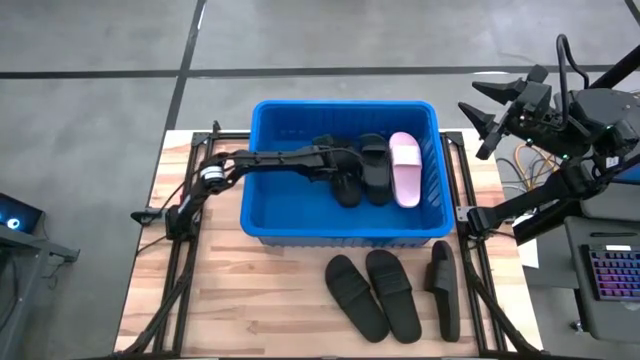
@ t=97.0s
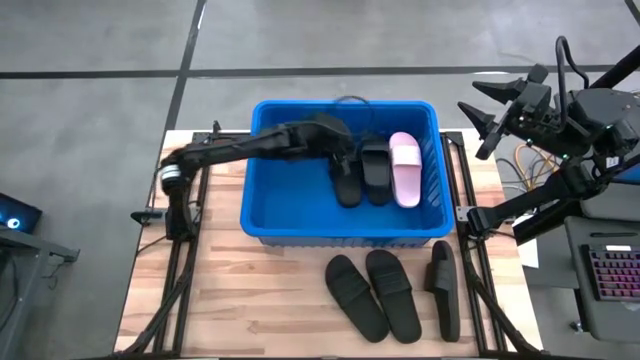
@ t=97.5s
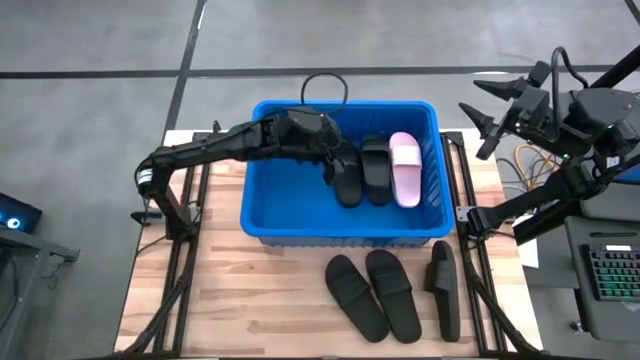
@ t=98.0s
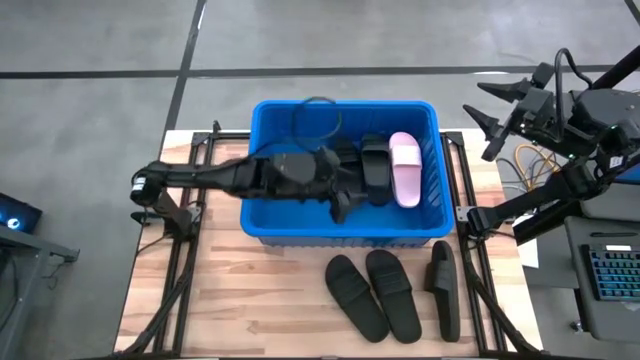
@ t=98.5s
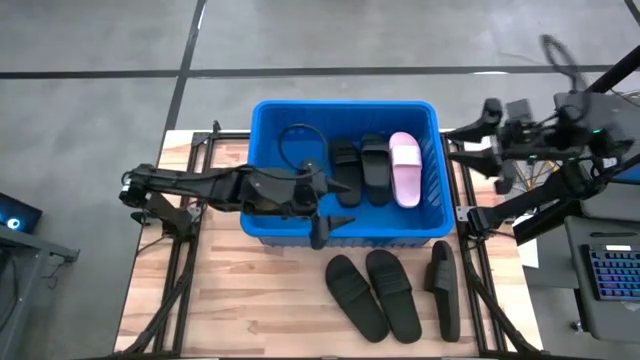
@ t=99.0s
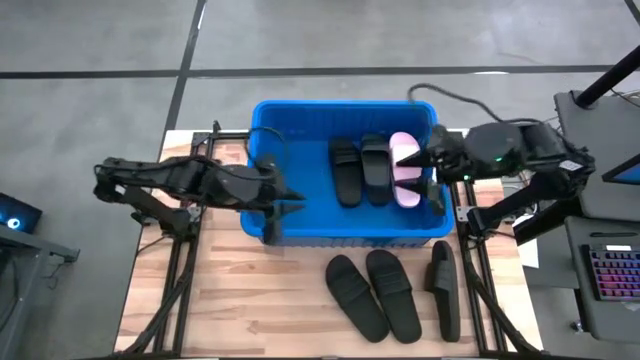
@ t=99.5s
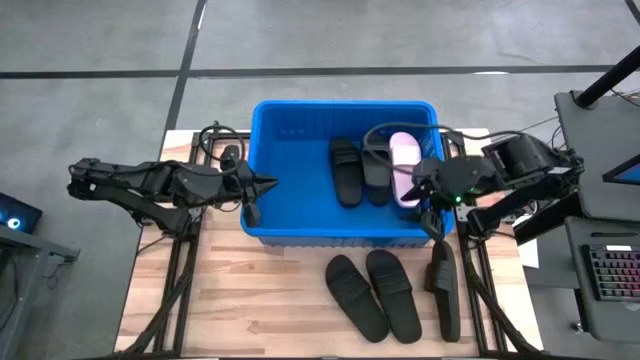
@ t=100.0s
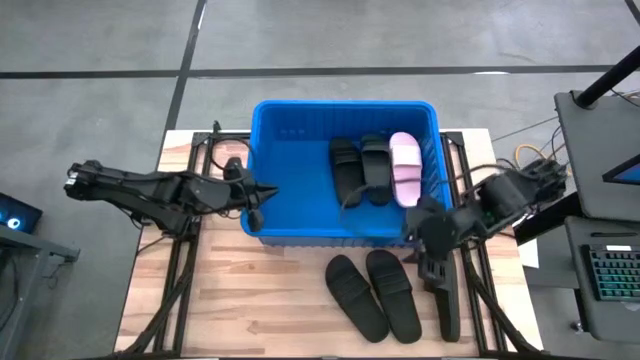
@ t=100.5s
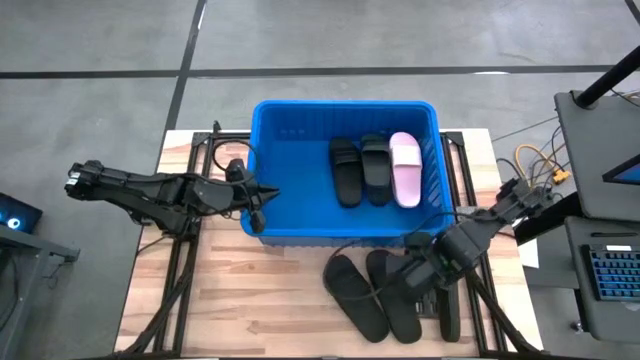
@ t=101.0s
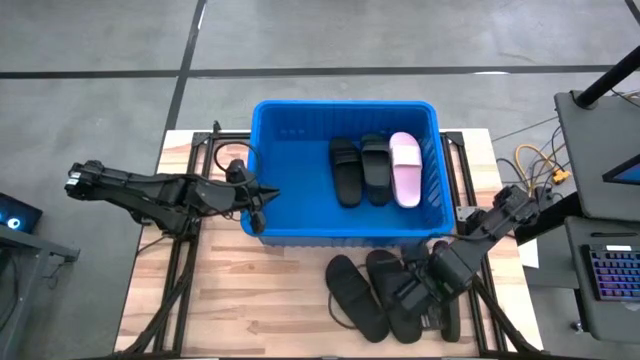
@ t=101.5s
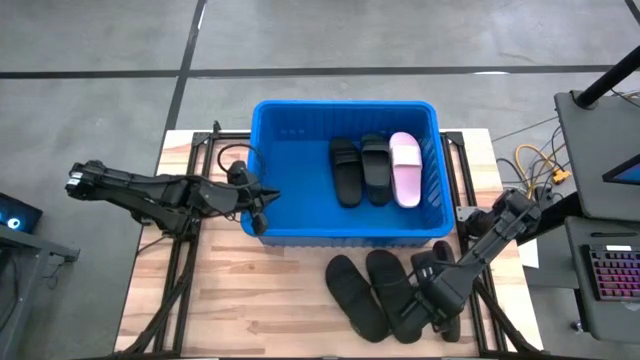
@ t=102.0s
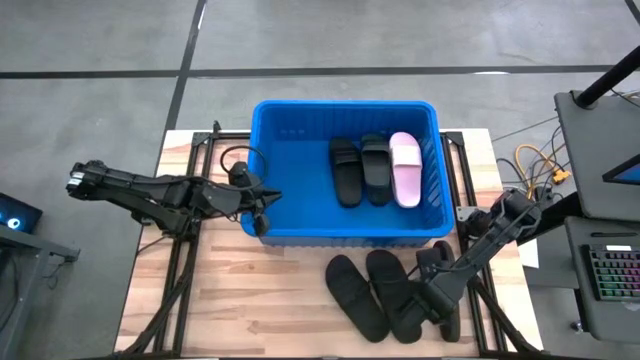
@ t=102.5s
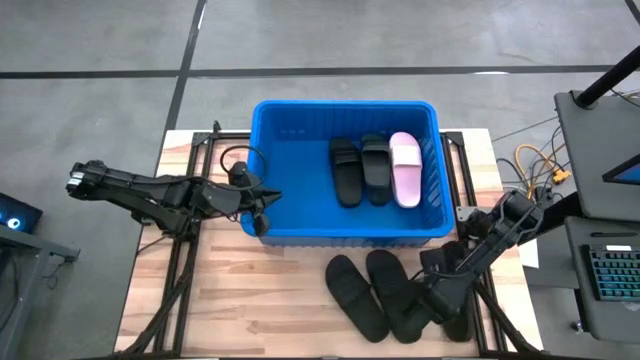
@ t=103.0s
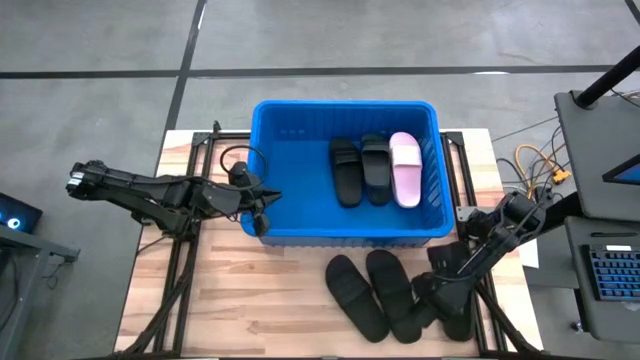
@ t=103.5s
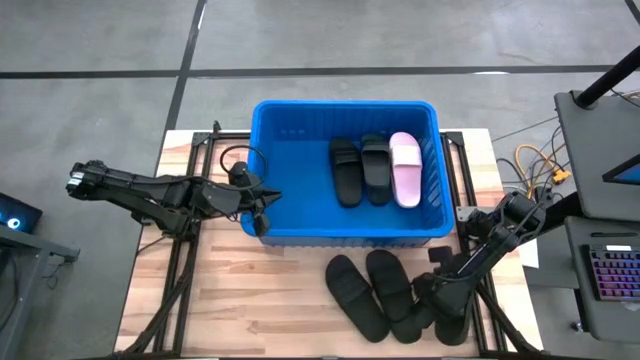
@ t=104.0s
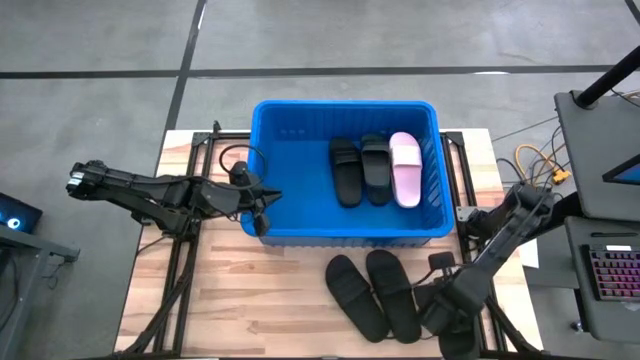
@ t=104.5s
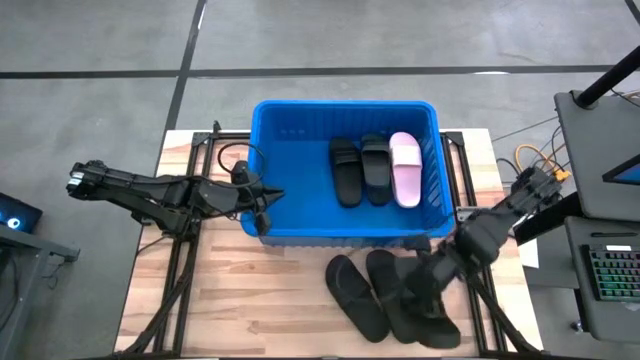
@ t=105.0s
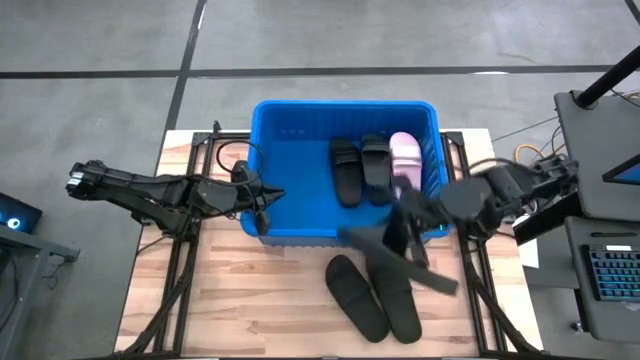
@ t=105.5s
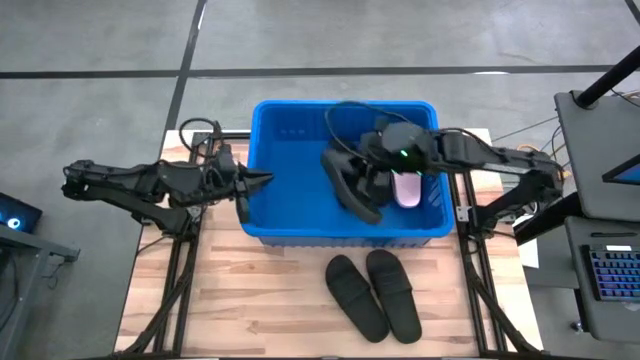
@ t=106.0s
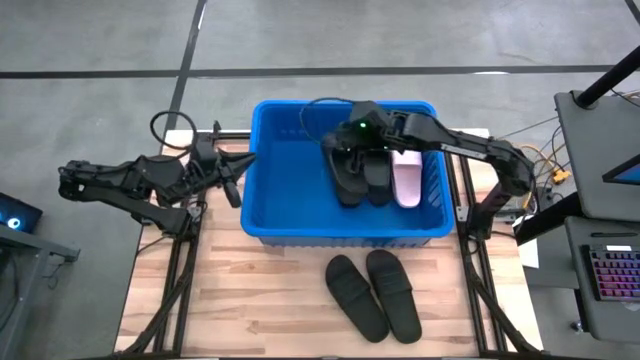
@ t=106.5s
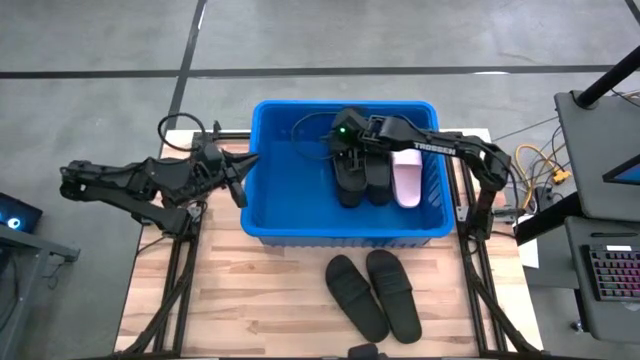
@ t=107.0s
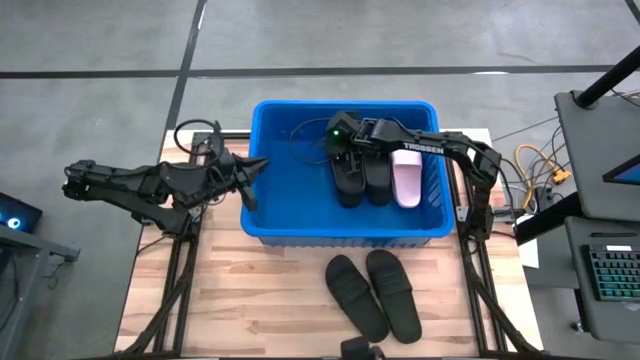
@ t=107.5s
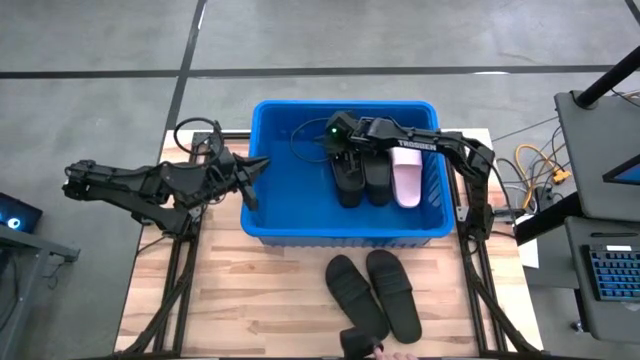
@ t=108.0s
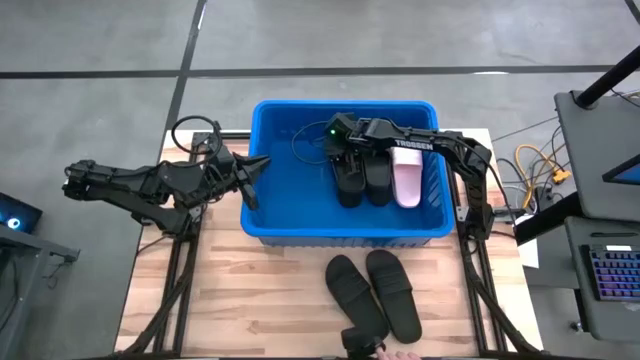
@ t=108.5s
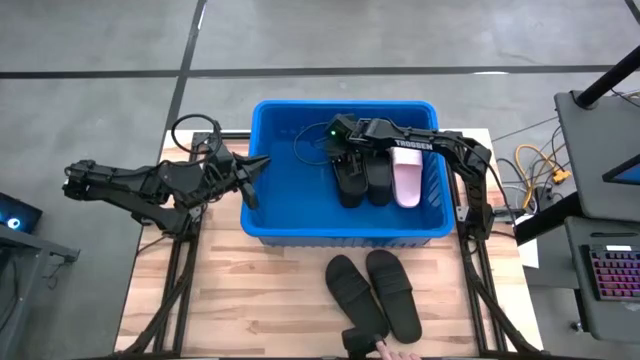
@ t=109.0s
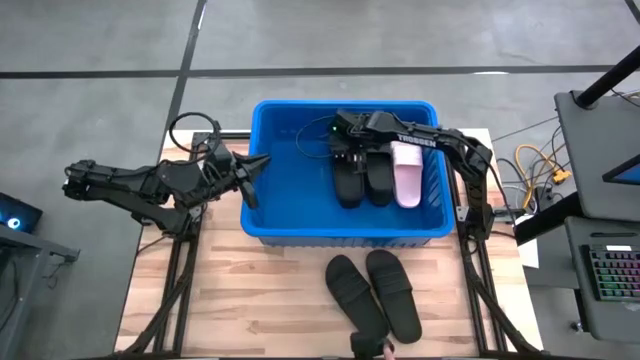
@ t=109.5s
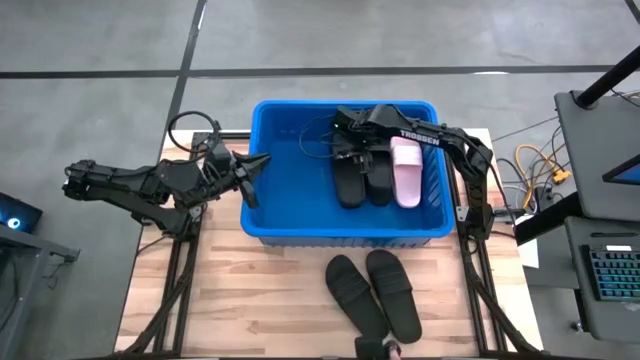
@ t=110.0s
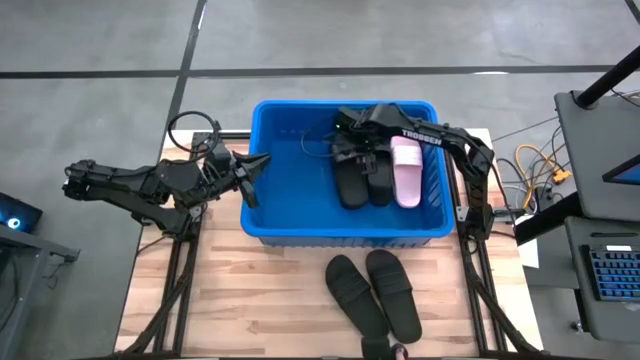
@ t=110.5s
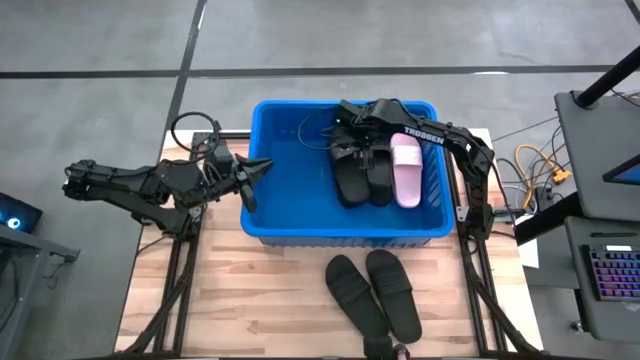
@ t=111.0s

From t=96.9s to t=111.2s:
Task: Pick and place slides into bin
Put the black slide into the blue bin

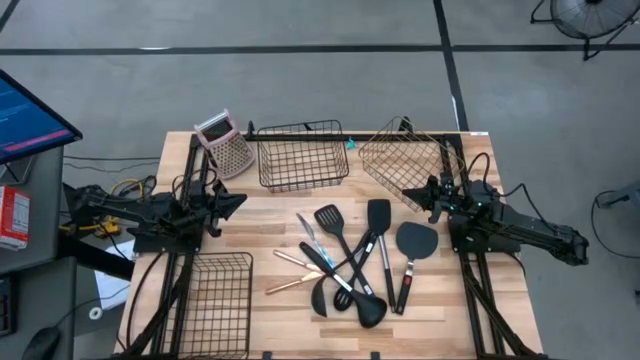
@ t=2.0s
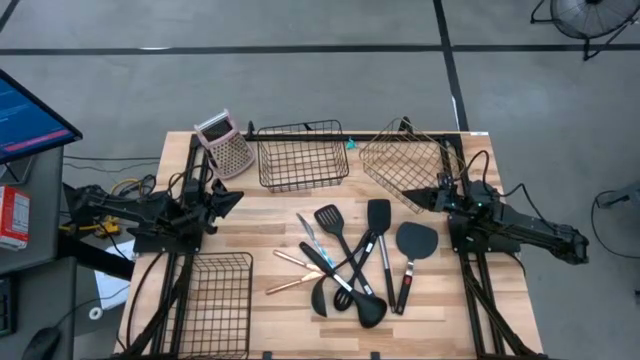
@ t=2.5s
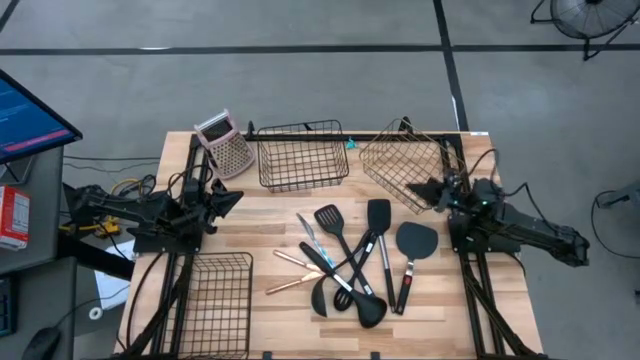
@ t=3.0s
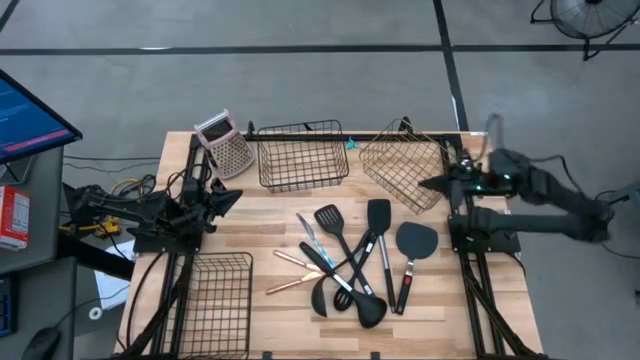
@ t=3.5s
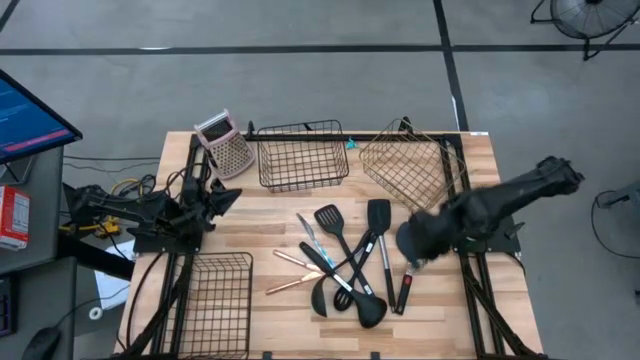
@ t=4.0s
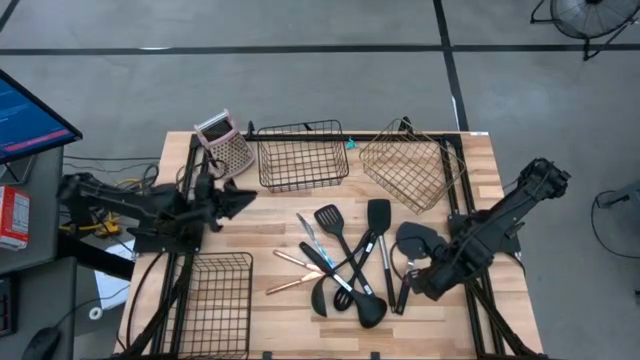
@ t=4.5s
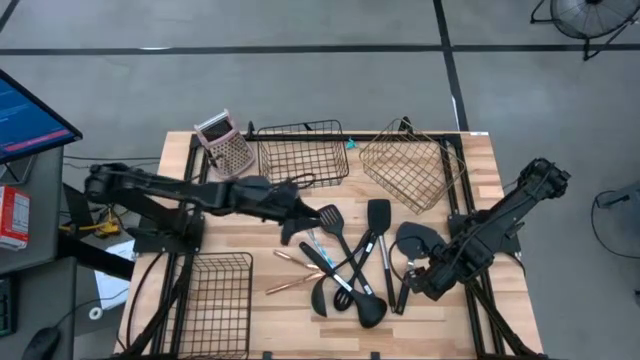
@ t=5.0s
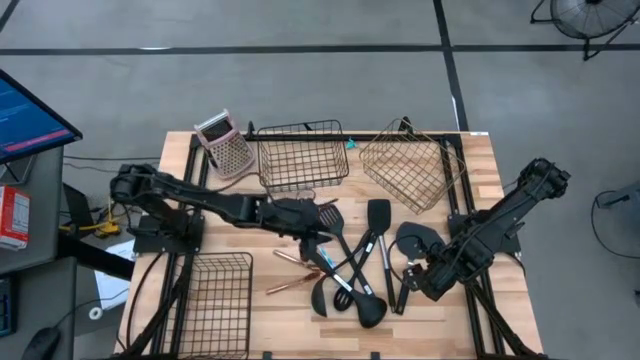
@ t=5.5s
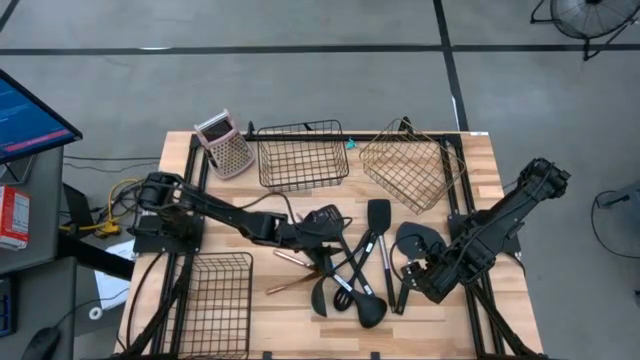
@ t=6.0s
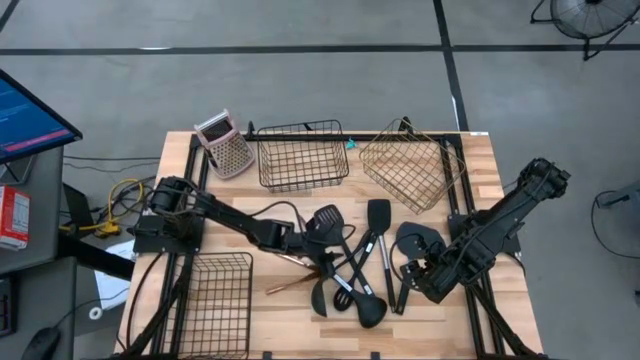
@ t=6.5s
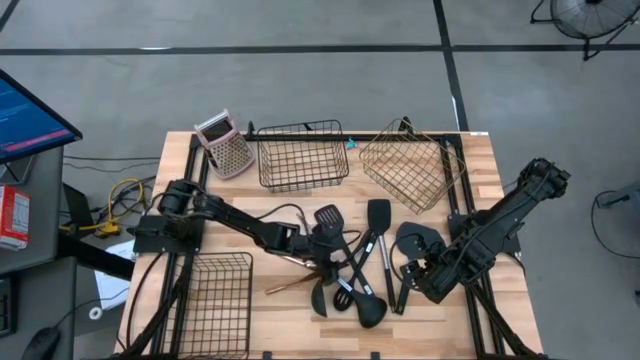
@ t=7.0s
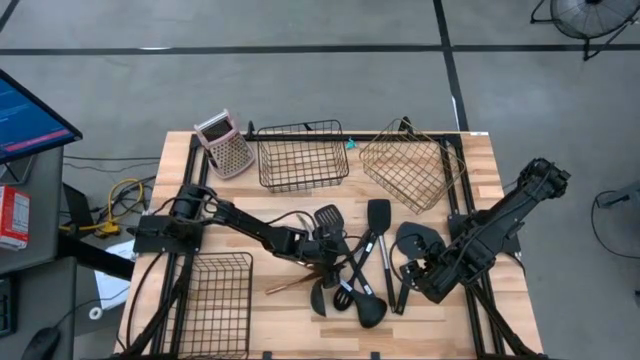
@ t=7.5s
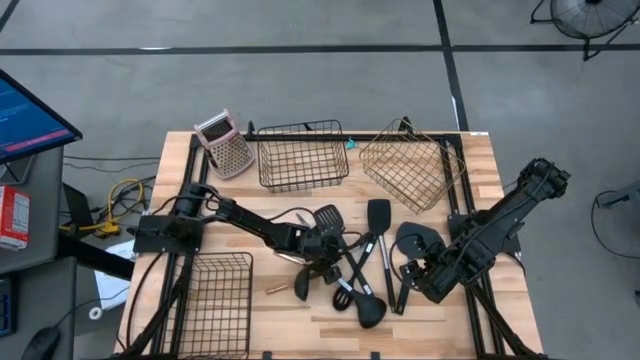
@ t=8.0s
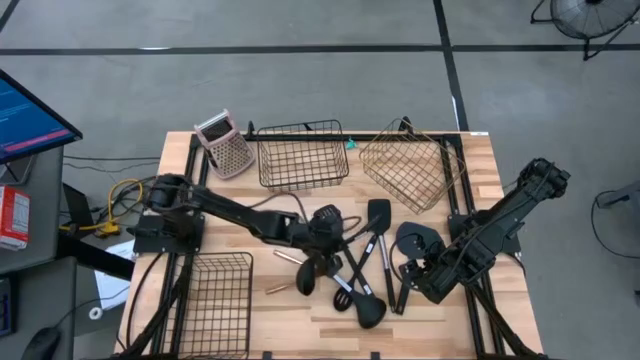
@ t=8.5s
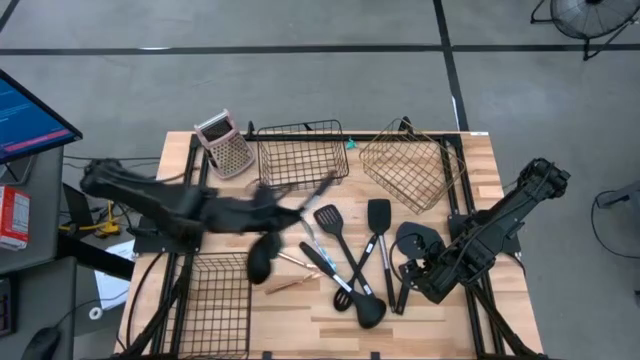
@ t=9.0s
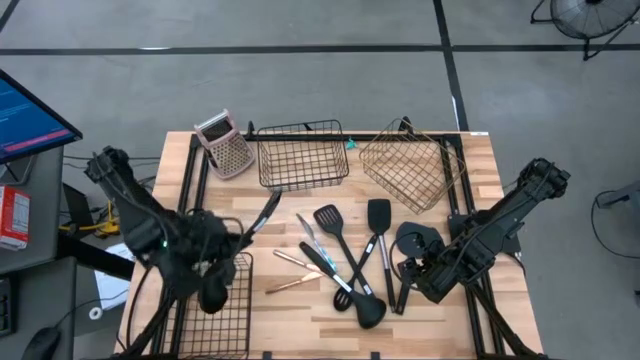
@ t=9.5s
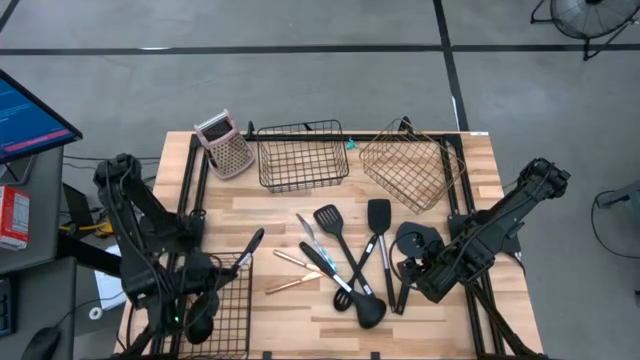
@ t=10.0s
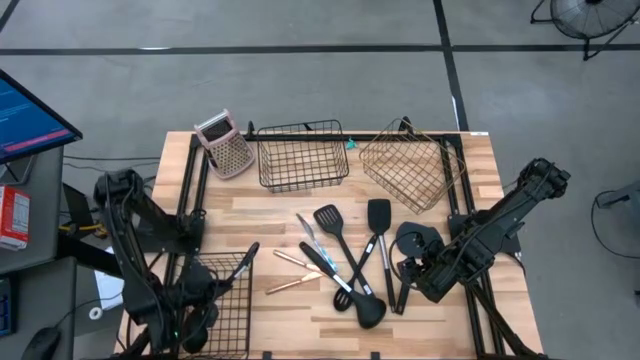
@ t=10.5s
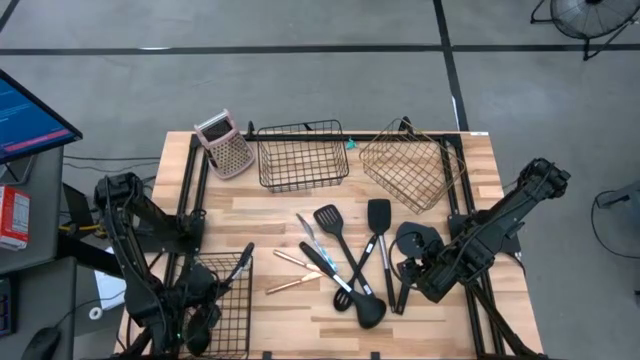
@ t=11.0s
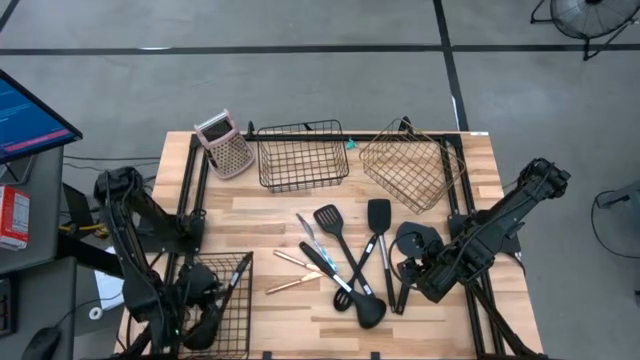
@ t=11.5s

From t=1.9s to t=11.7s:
Task: Pick & Place Kitchen Items
Put the black serving spoon into the bottom black wire basket
